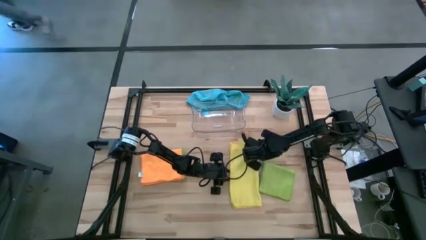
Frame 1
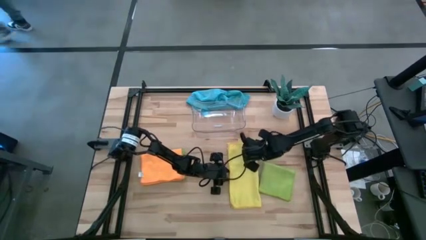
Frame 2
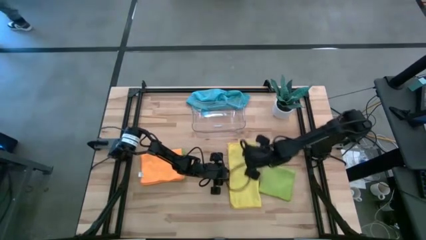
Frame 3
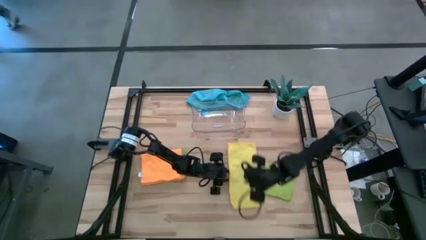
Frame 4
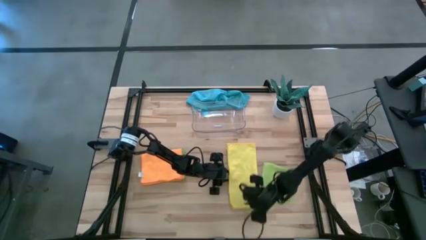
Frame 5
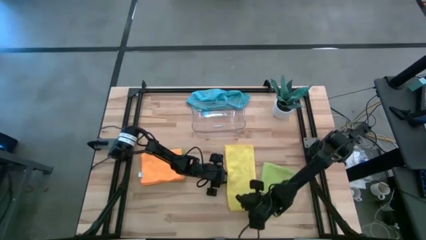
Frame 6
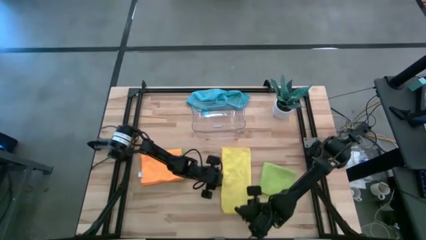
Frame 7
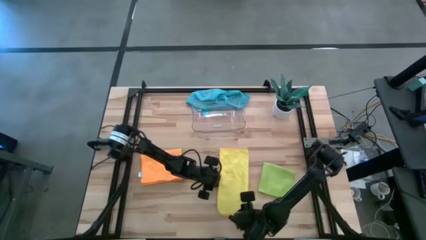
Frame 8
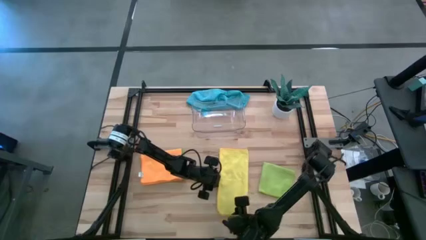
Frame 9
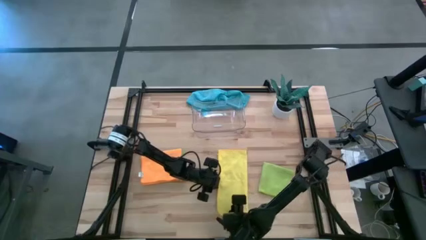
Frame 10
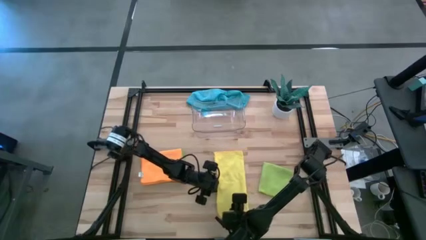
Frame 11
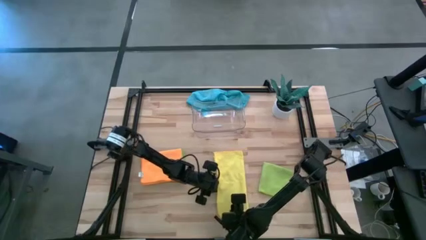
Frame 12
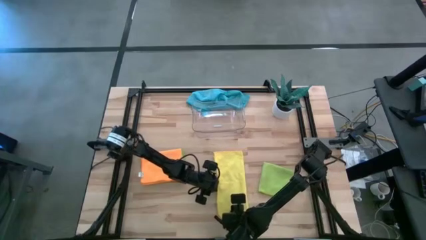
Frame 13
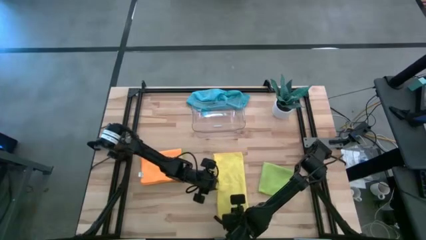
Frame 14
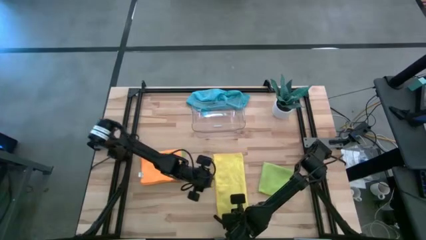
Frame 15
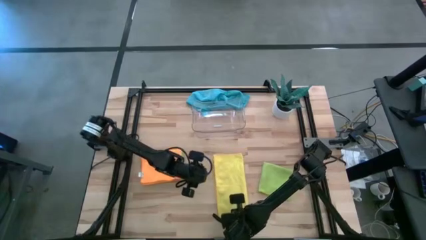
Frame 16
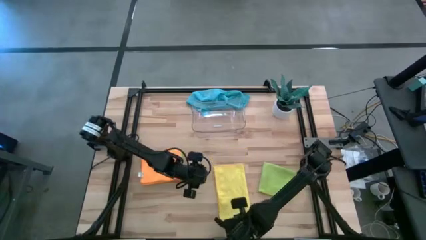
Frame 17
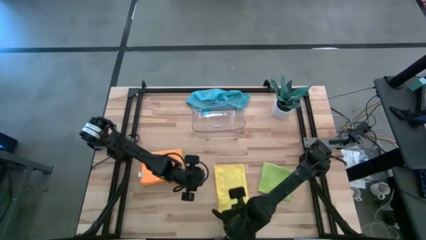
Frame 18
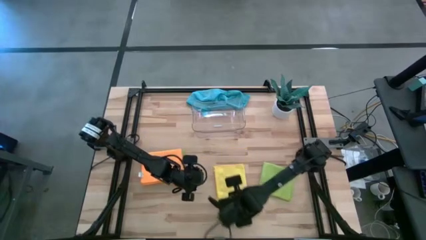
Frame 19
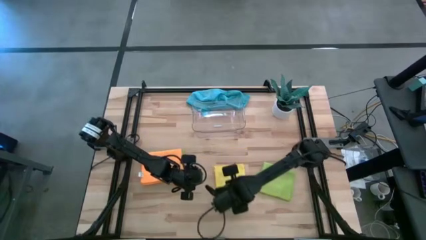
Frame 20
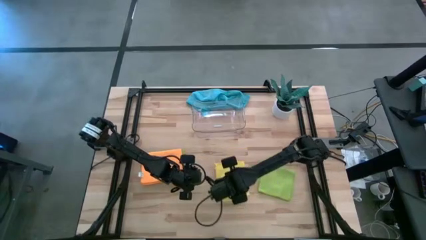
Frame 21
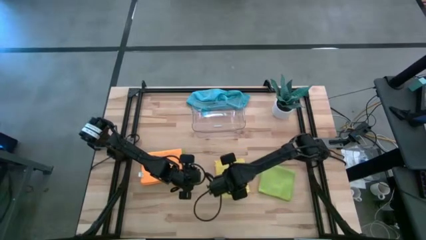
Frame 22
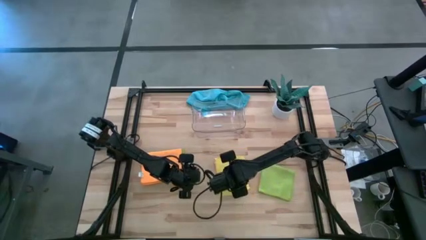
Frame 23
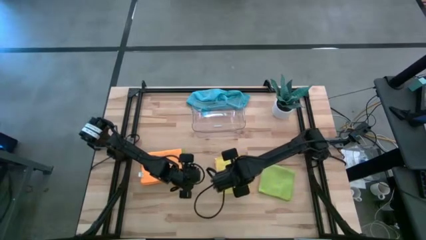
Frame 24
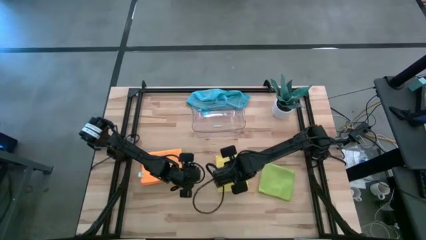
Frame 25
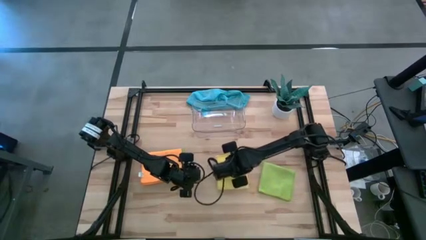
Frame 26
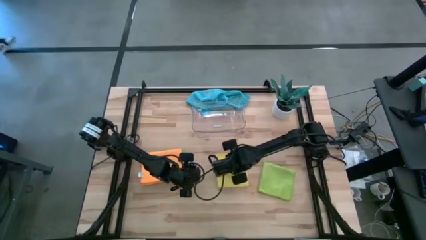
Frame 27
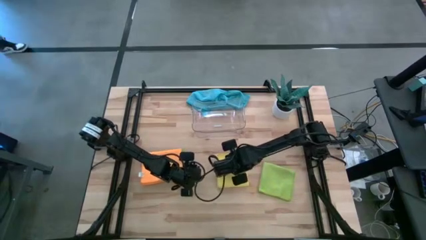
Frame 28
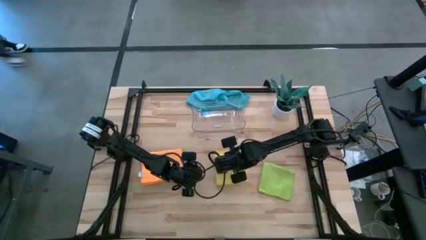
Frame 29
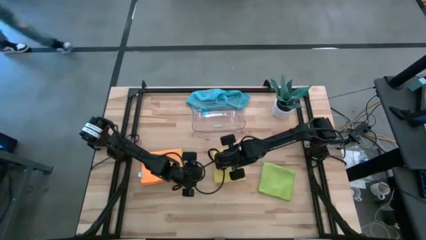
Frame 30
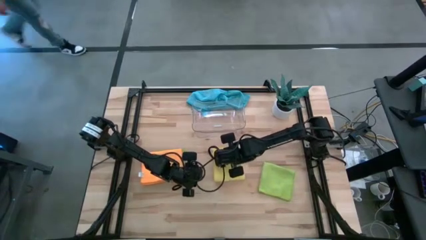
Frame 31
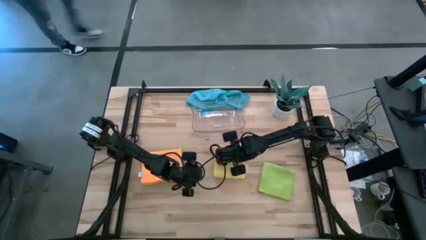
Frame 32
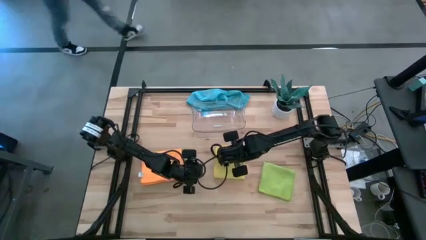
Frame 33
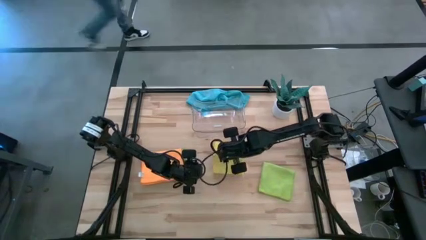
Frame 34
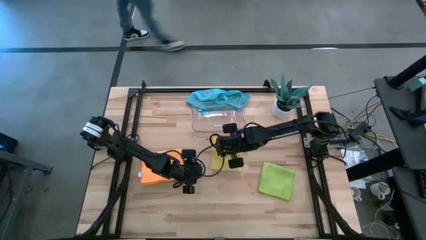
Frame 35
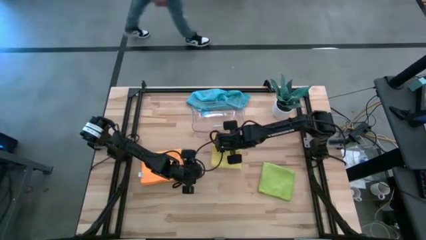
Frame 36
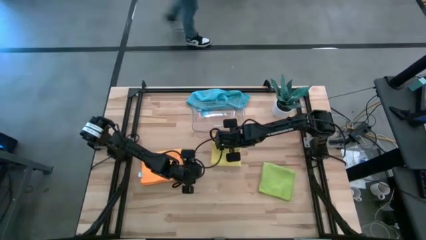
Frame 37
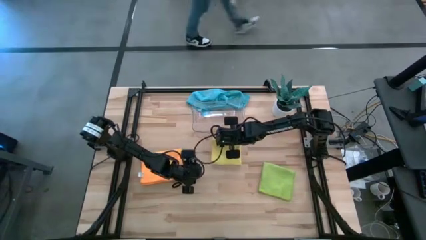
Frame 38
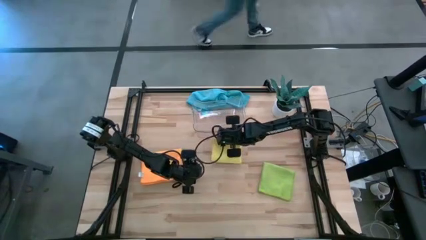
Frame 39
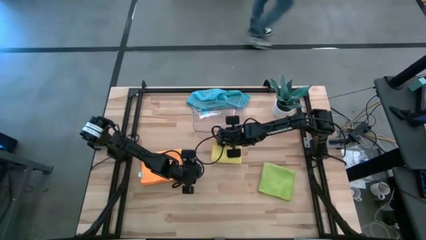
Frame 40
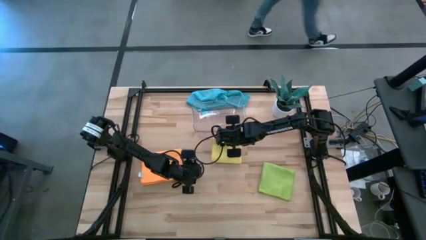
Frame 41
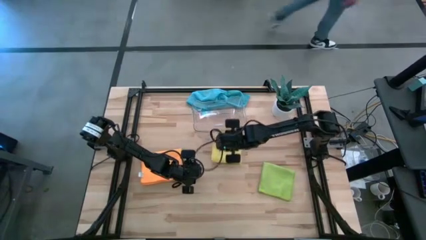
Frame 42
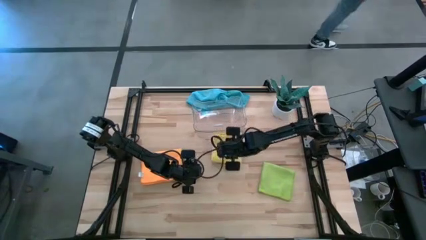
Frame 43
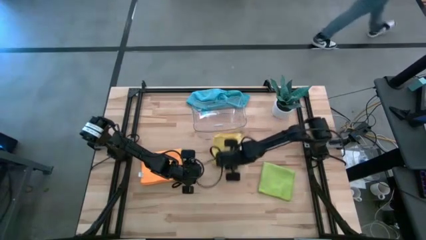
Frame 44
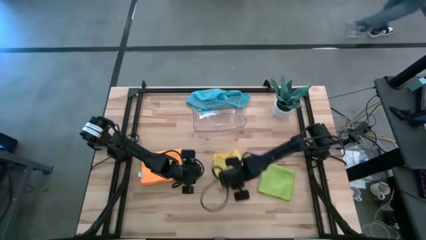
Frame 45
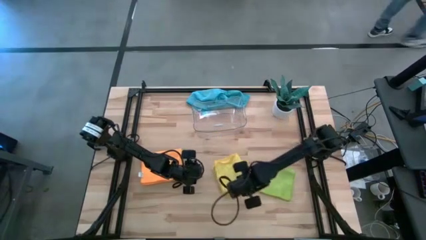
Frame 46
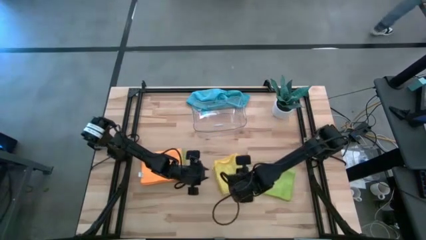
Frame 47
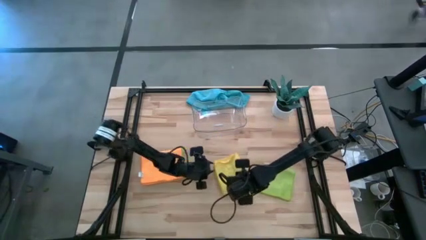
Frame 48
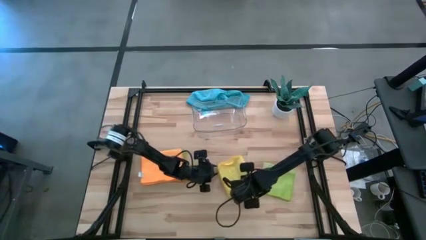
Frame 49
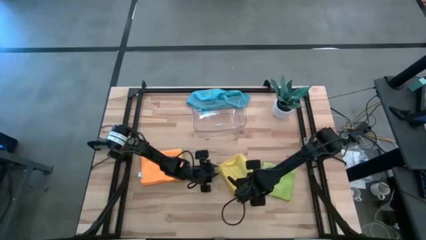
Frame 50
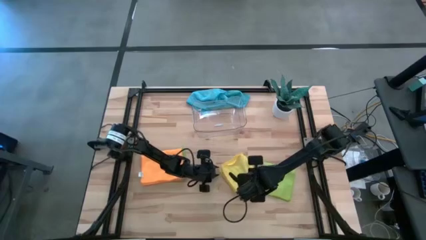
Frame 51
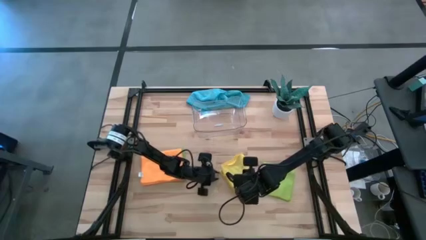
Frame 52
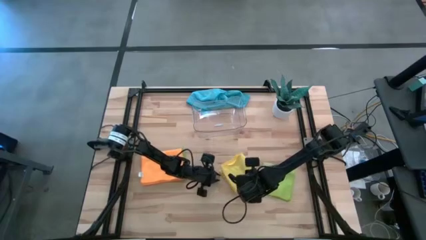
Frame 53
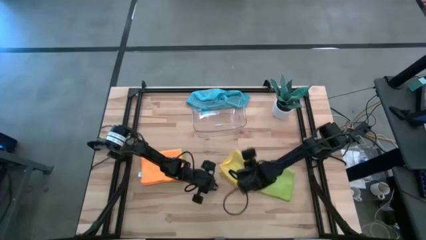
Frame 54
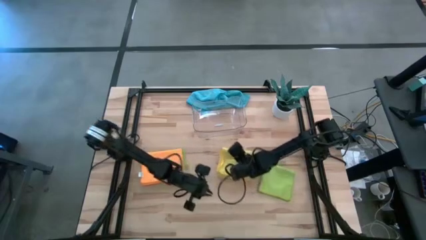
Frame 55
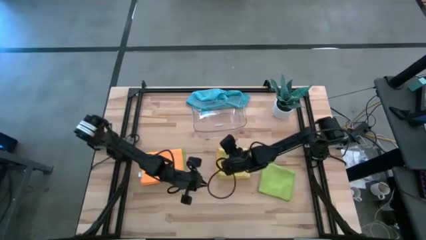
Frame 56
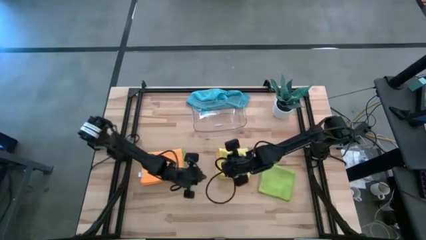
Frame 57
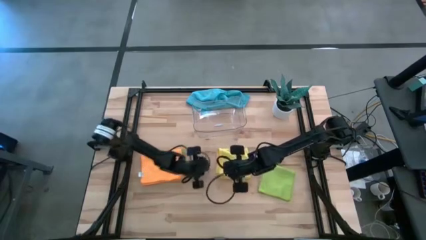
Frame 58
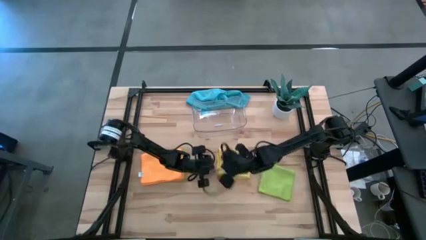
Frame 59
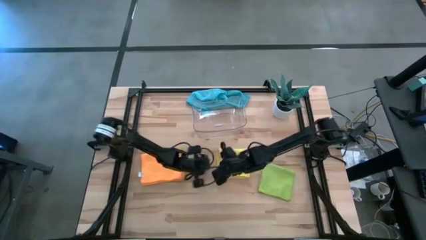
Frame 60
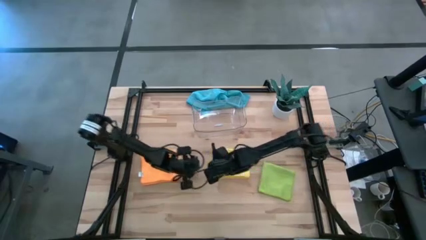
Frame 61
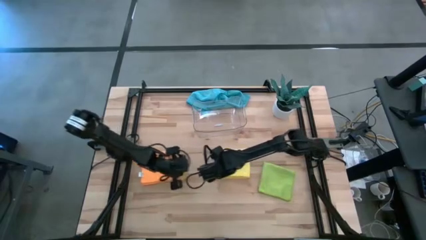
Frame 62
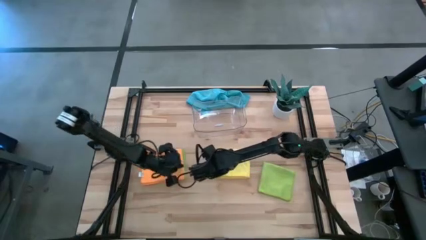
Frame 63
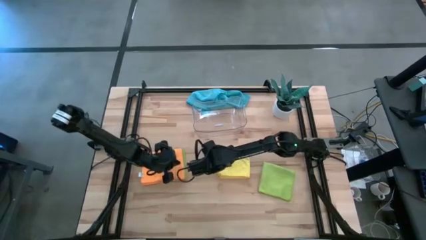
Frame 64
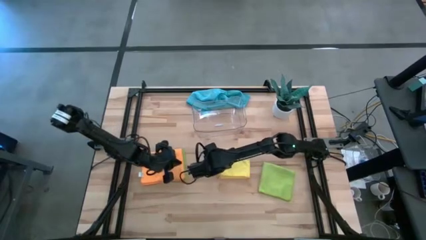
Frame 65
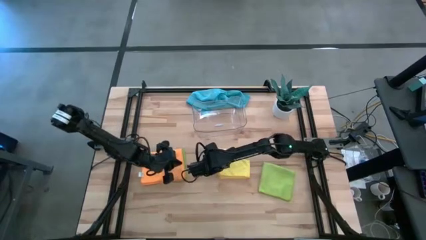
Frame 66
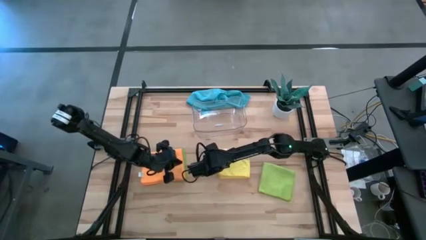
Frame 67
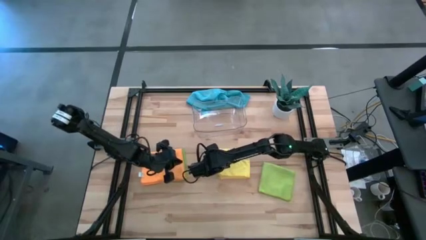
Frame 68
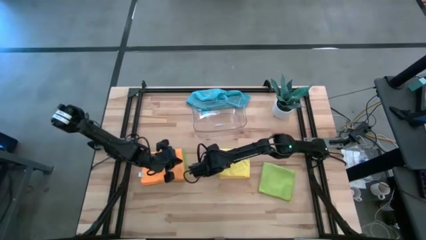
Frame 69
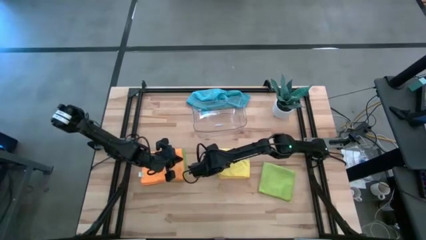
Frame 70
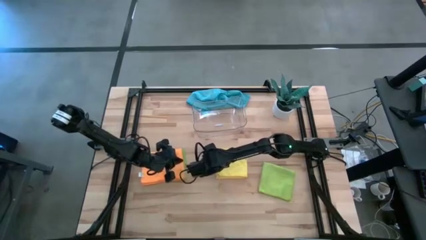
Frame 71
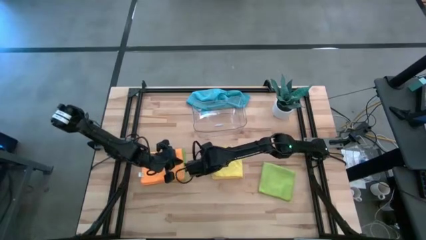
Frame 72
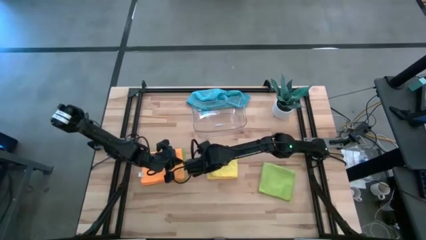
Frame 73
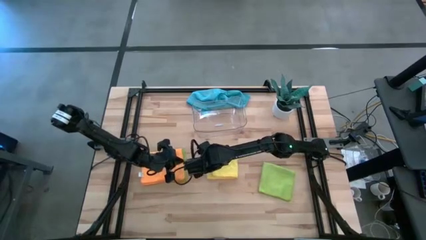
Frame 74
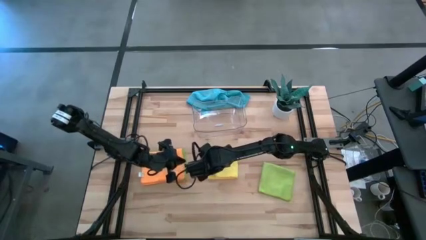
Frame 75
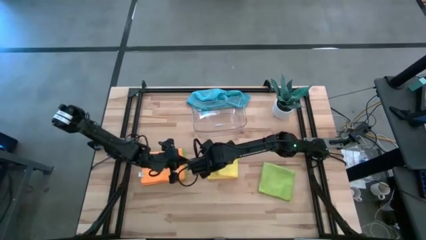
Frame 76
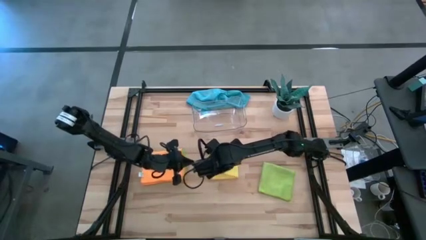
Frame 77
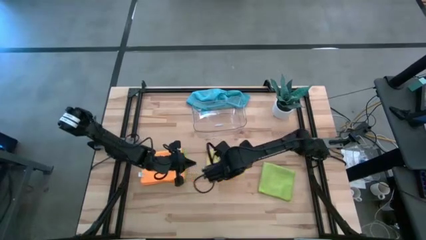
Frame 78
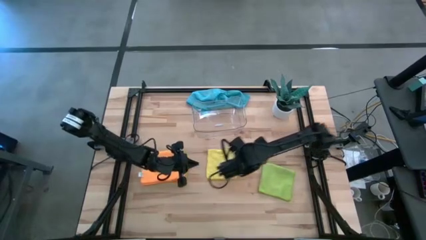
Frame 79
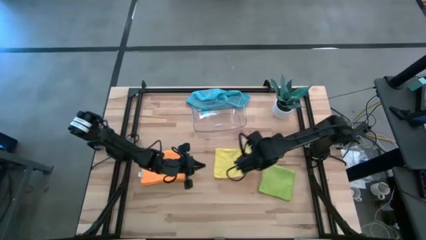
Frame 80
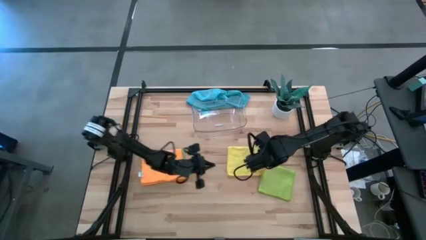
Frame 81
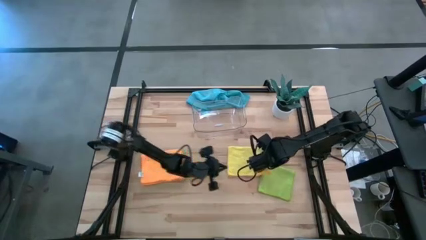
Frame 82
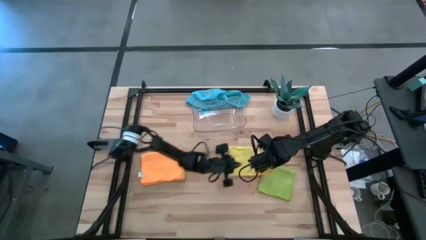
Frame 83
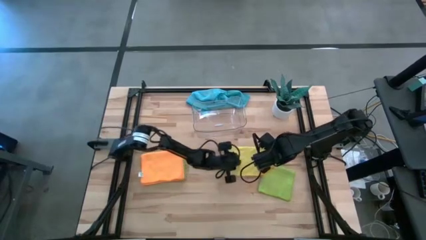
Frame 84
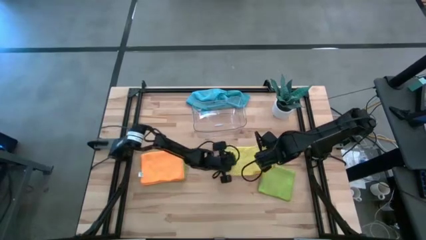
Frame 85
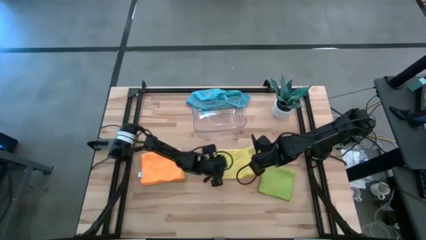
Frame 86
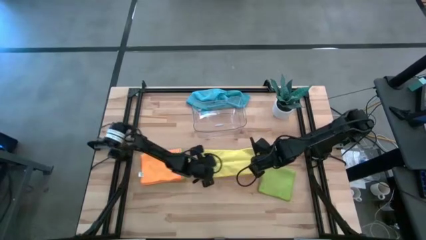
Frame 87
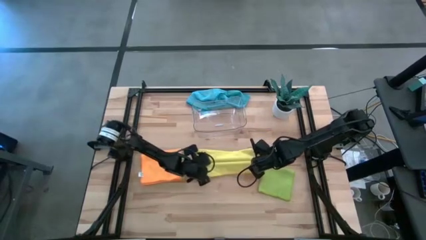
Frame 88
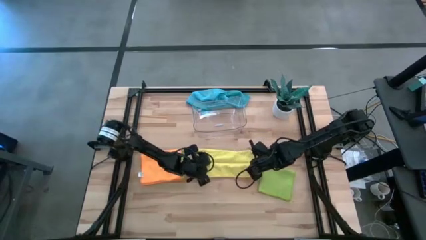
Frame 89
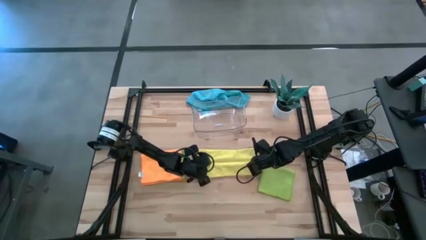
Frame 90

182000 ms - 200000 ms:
Task: Fold microfiber towels
Fold the yellow microfiber cloth
